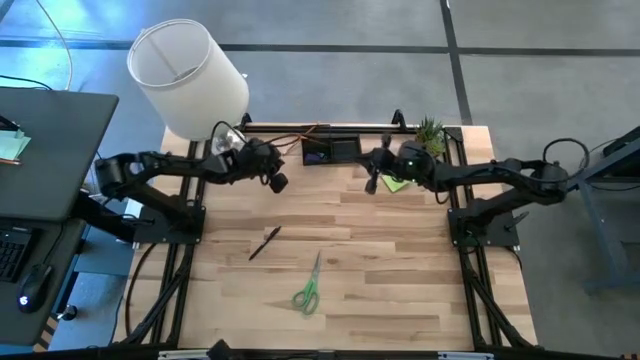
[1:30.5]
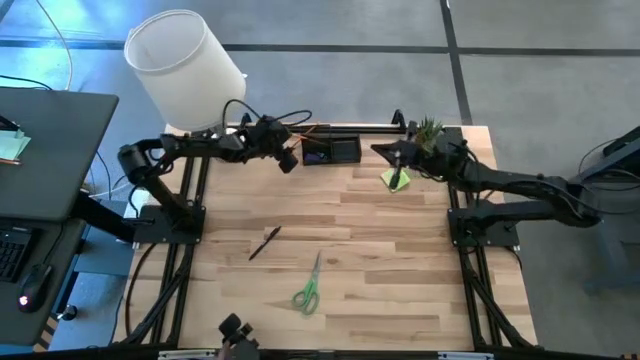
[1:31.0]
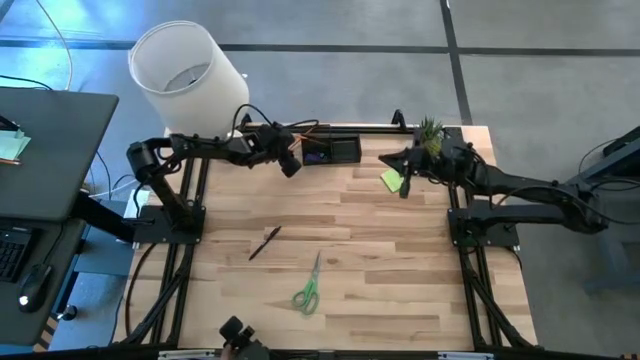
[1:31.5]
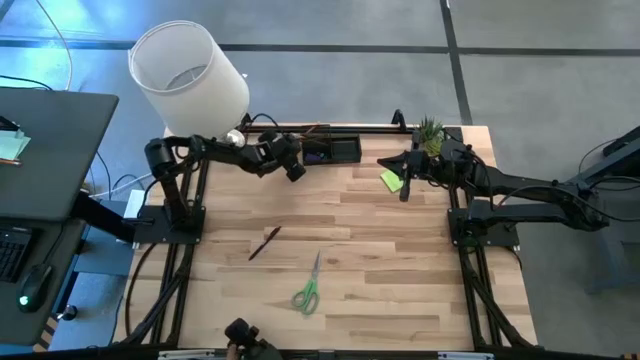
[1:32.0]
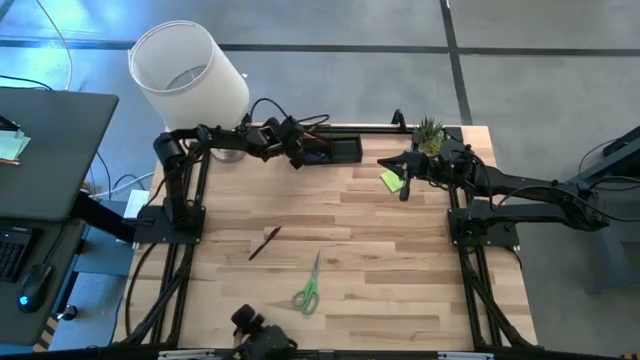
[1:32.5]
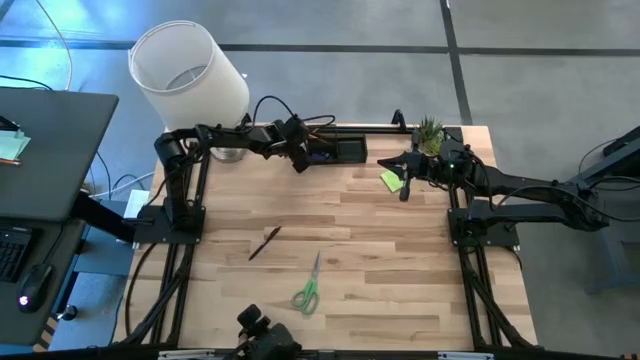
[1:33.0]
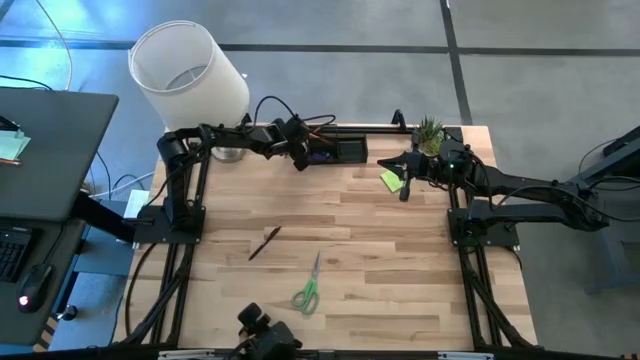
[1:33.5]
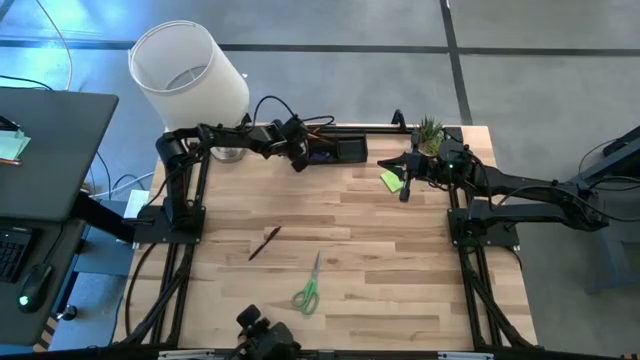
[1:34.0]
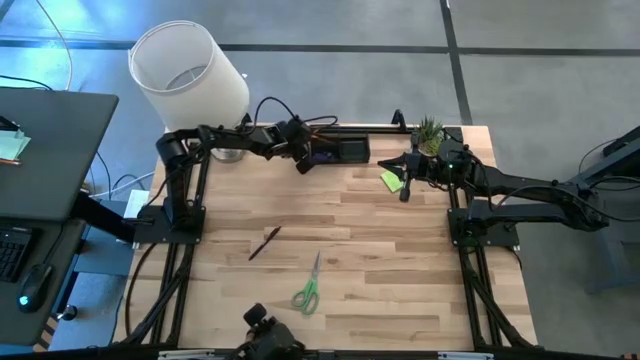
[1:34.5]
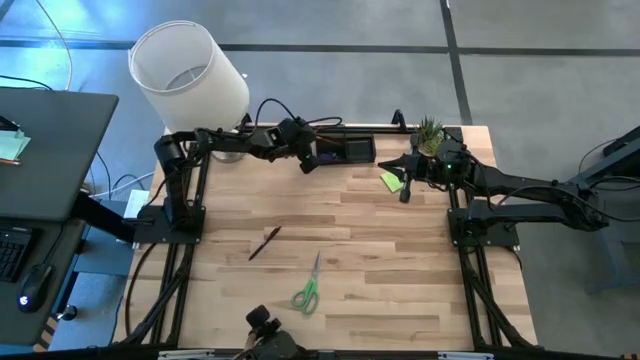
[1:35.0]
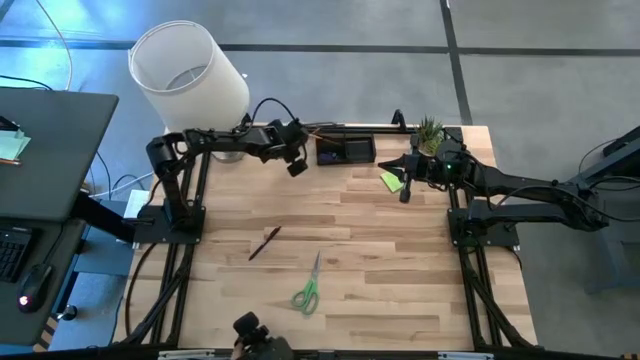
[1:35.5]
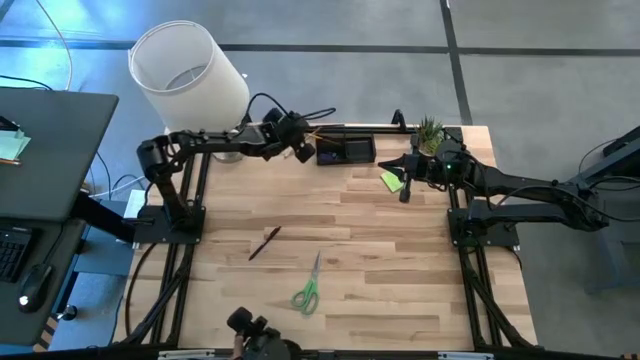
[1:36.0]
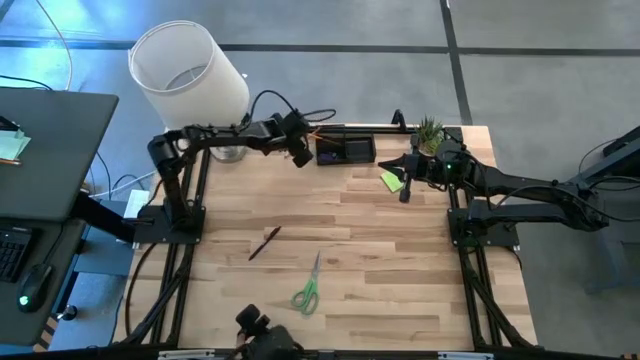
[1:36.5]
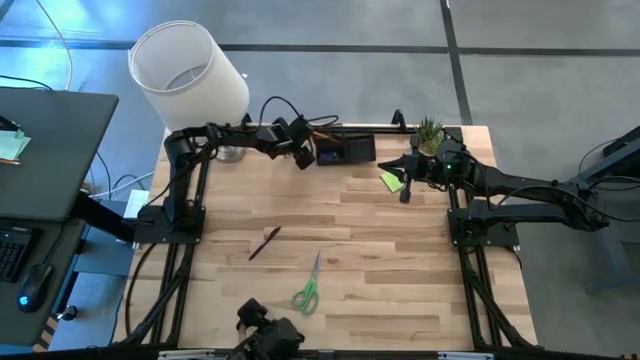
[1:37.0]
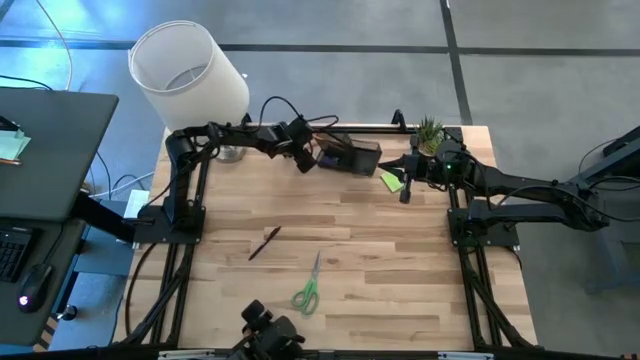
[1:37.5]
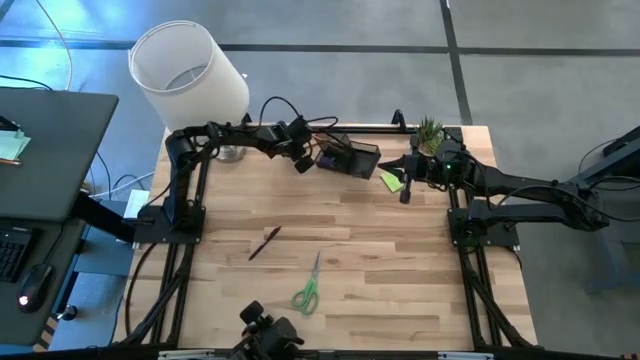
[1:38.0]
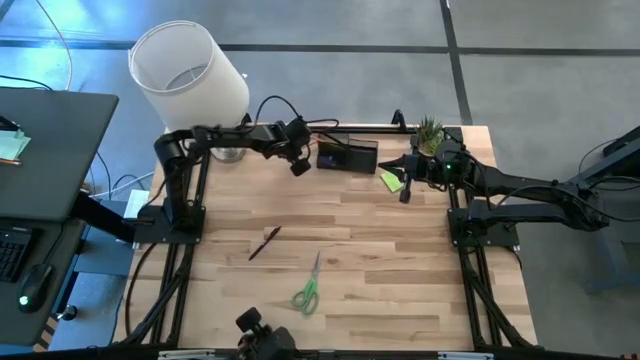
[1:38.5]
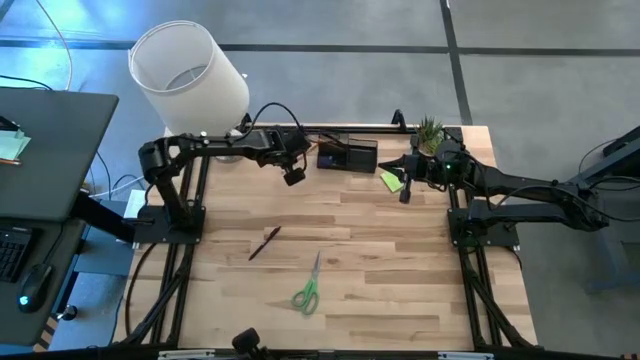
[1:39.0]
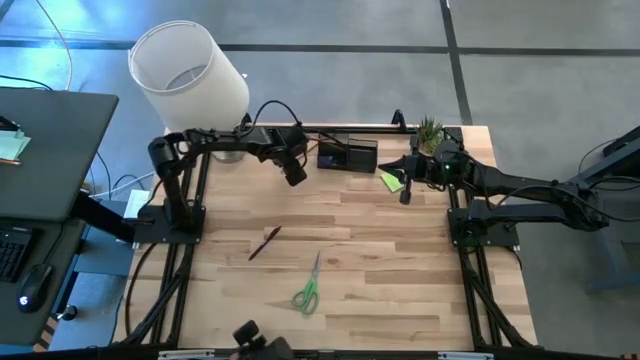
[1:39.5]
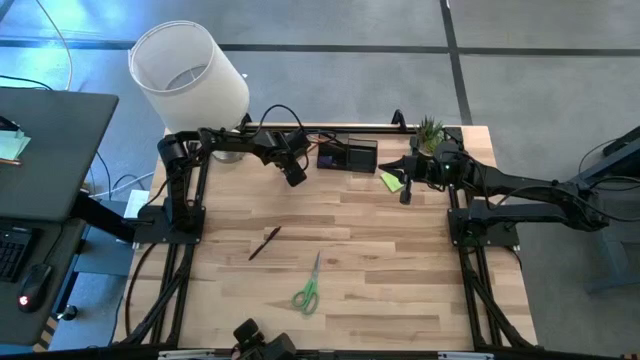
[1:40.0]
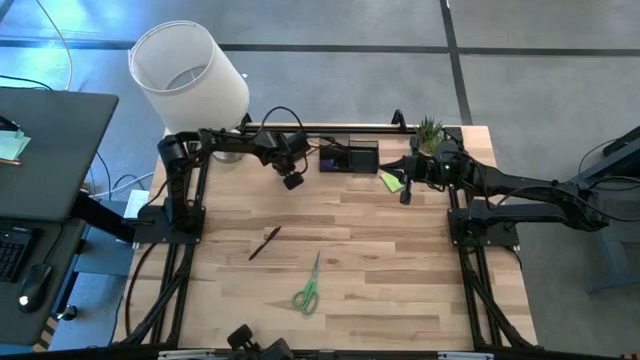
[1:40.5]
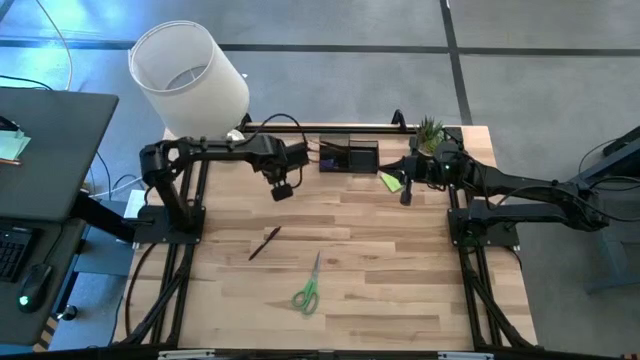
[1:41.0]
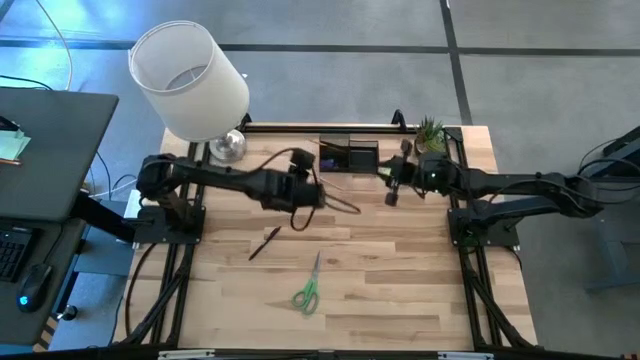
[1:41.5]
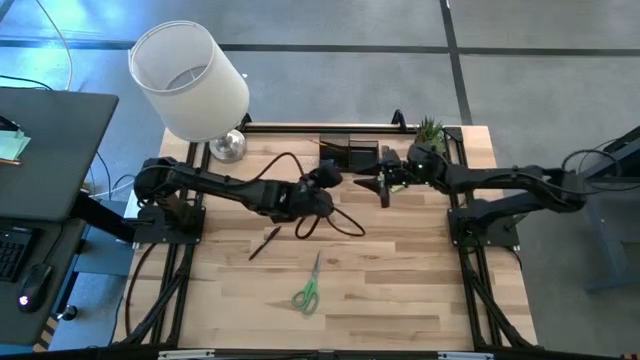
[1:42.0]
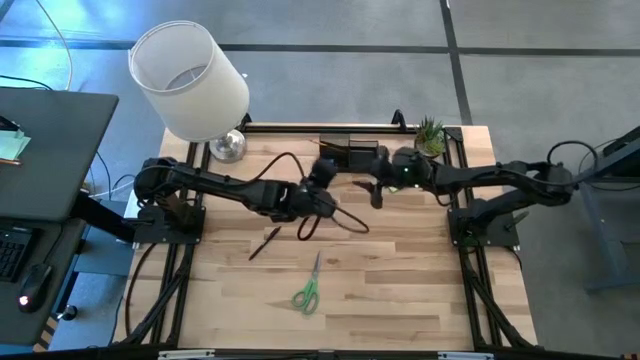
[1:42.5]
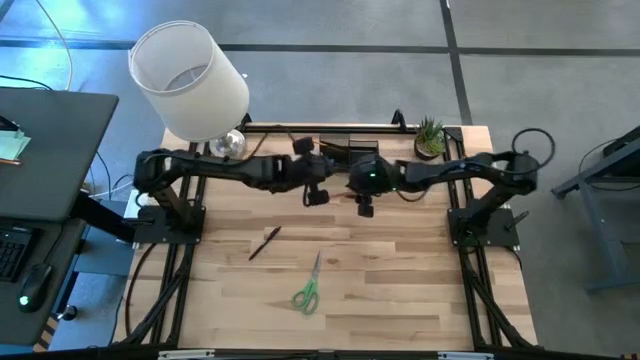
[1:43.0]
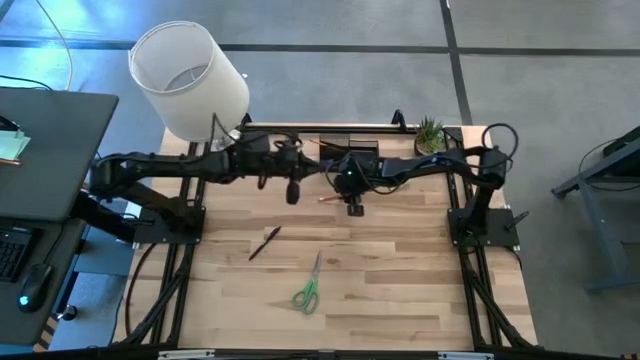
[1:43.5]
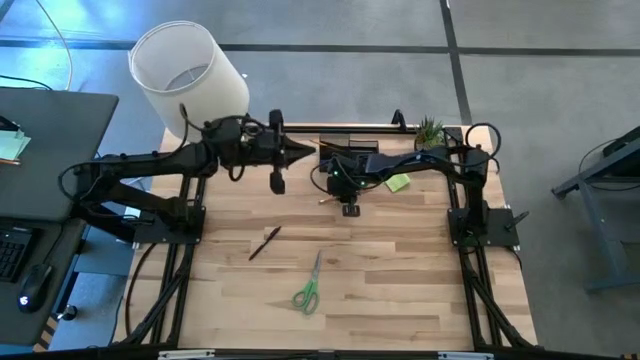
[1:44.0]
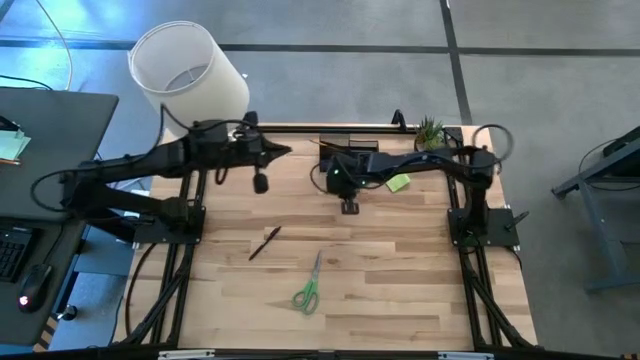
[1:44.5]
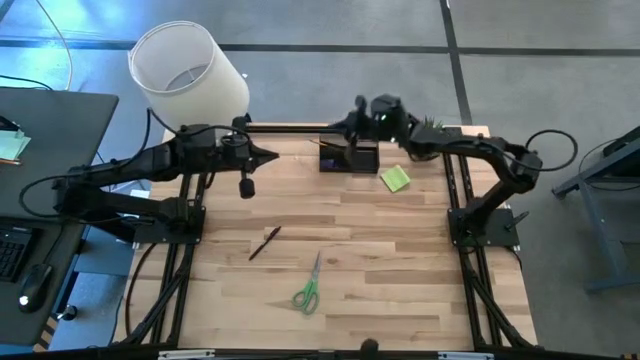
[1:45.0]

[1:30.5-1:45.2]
Task: Pick and place office supplies into organizer
Put the orange pencil into the black desk organizer

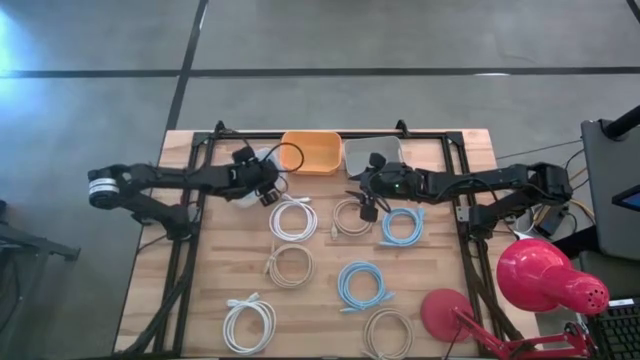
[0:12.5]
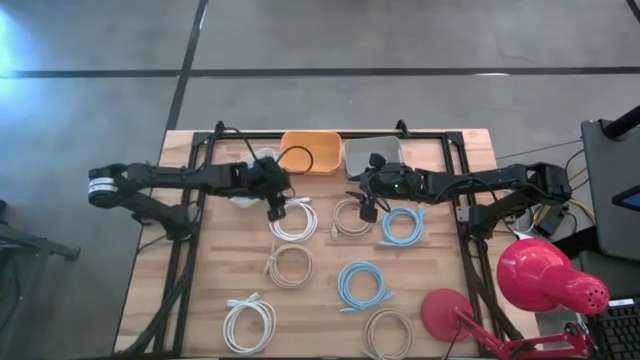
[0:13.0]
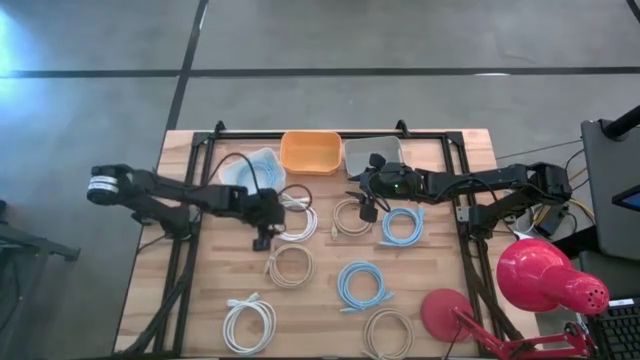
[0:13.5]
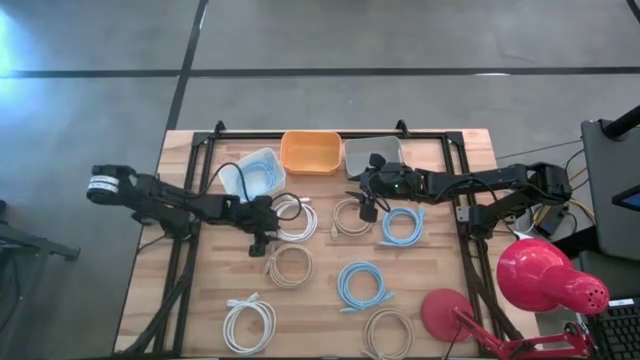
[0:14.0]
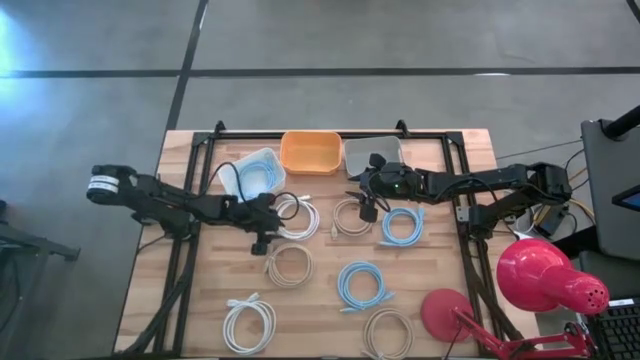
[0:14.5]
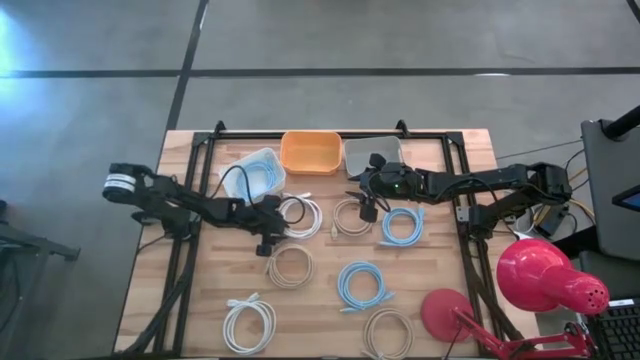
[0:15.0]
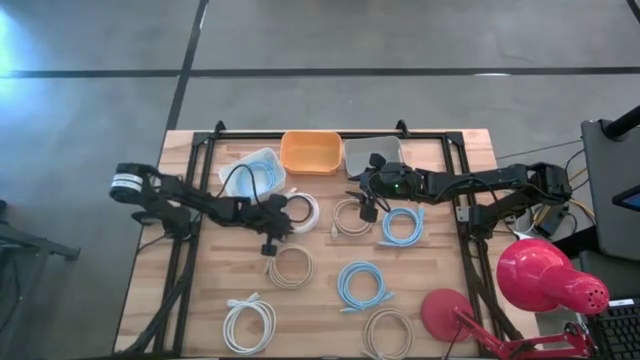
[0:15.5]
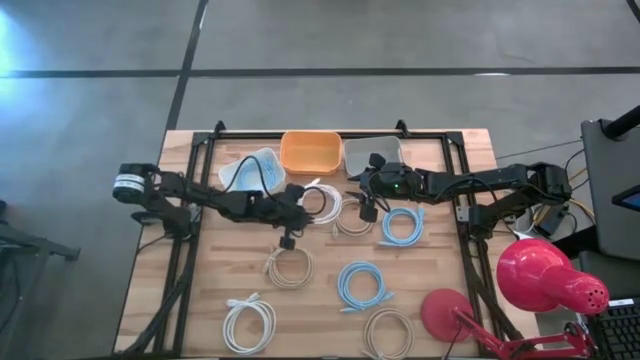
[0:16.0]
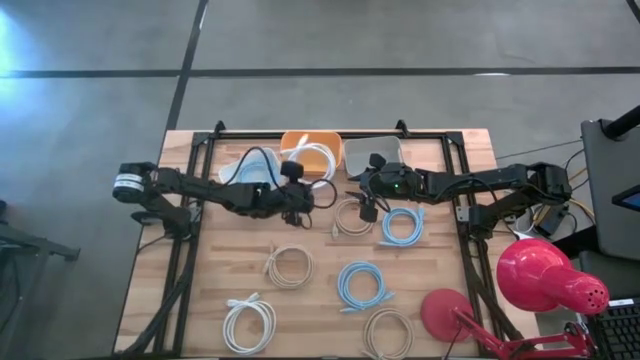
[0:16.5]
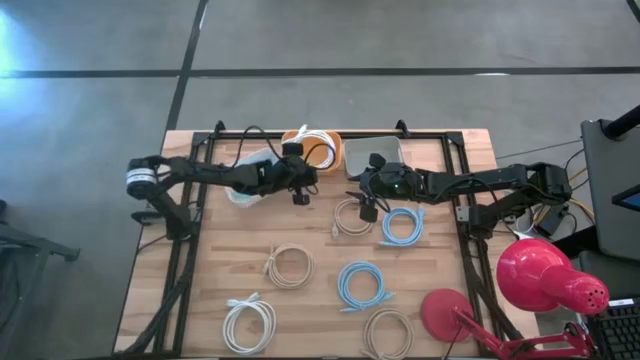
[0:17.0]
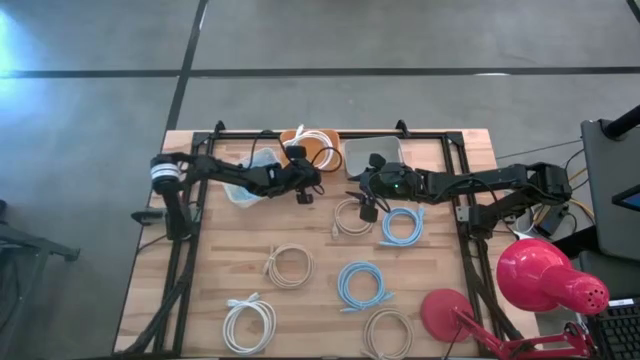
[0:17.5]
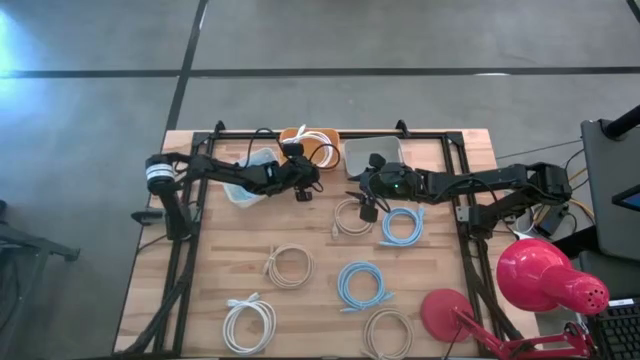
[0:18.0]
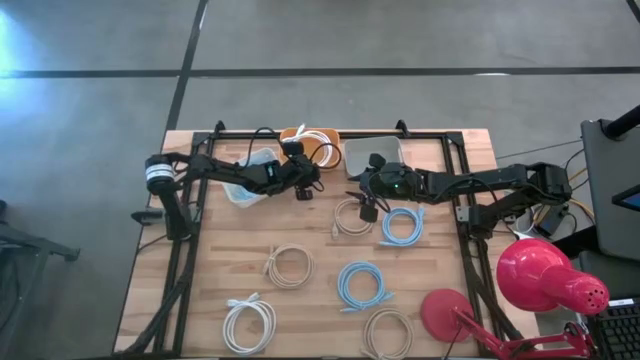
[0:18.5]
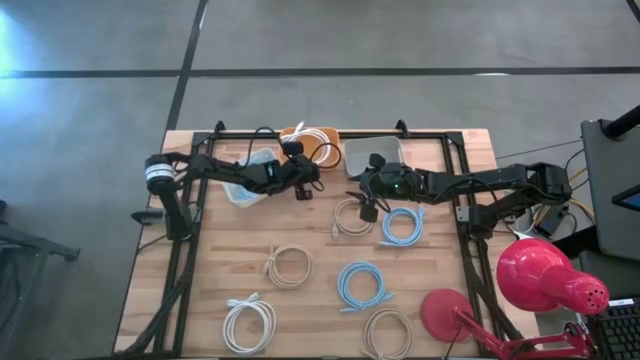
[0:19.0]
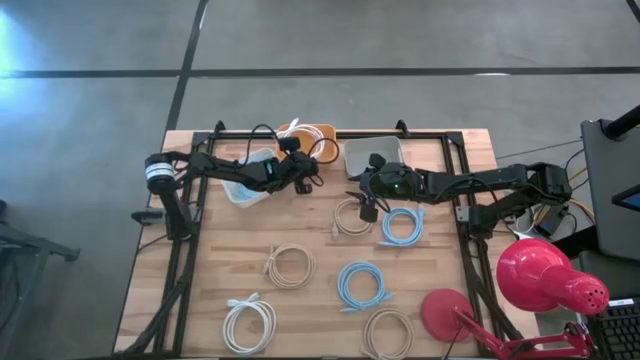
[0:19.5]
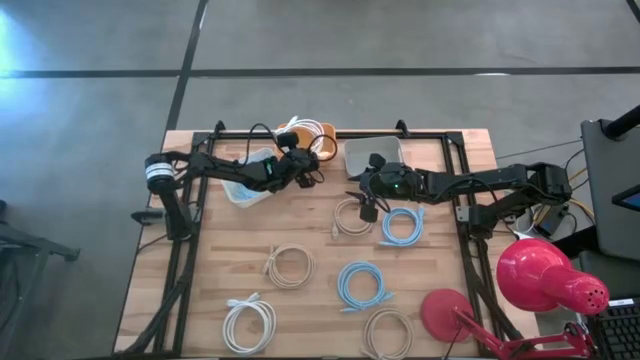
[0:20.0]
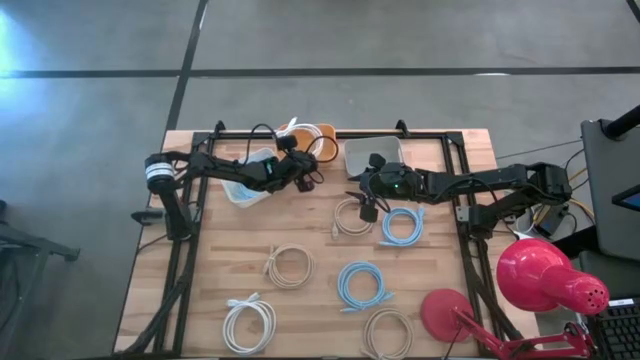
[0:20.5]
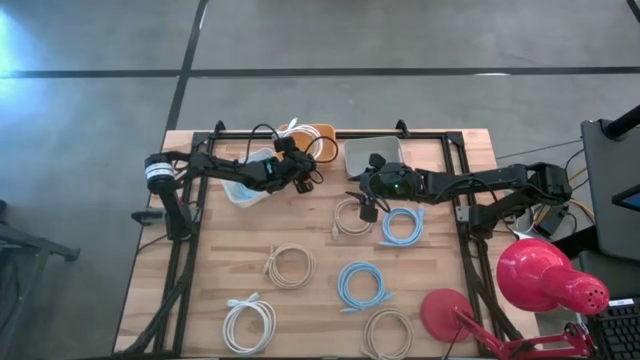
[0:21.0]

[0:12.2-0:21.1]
Task: Sort HDMI cables
Put the top white HDMI cable into the yellow bin
